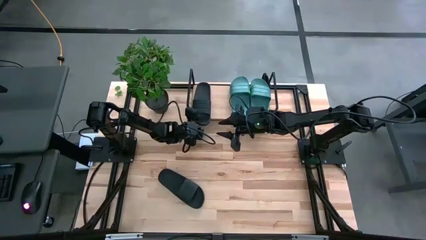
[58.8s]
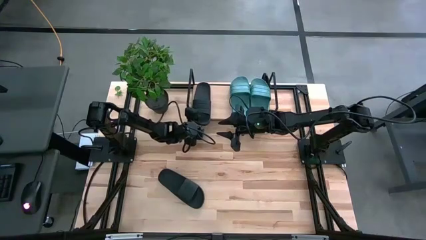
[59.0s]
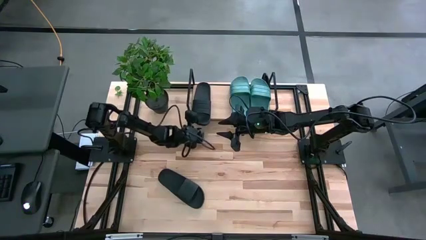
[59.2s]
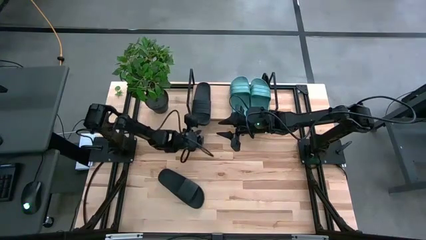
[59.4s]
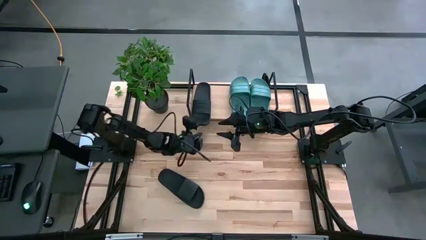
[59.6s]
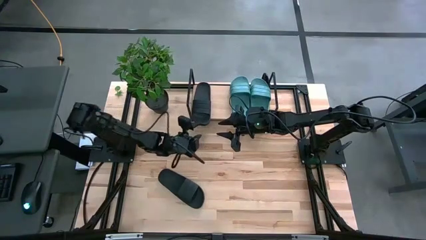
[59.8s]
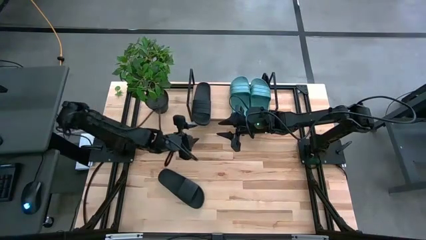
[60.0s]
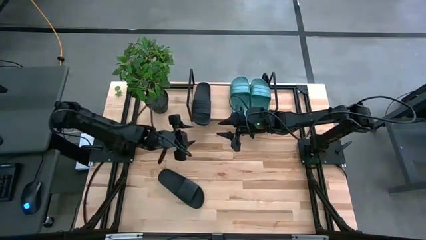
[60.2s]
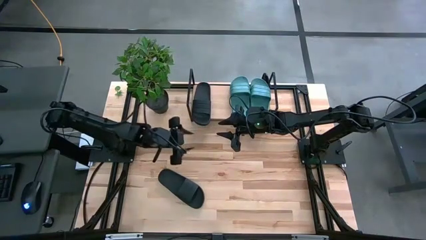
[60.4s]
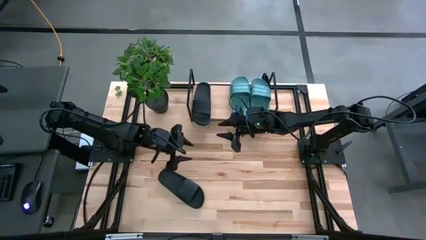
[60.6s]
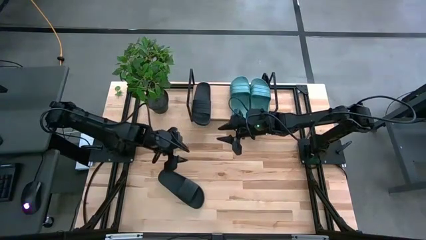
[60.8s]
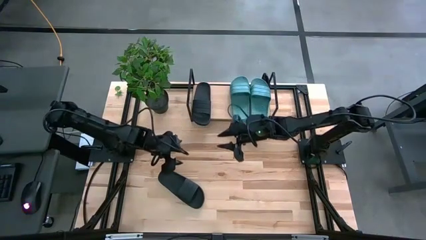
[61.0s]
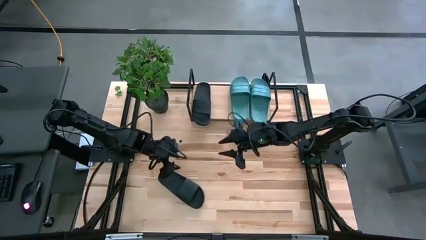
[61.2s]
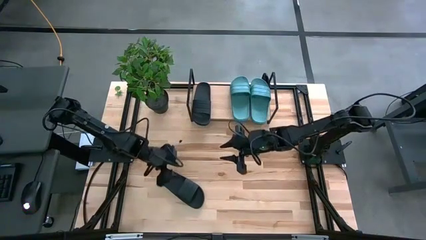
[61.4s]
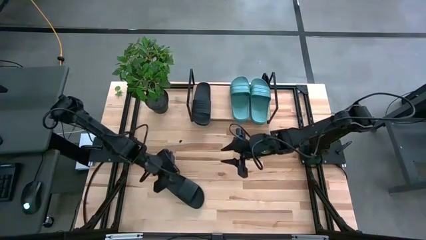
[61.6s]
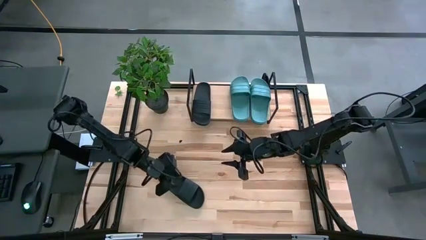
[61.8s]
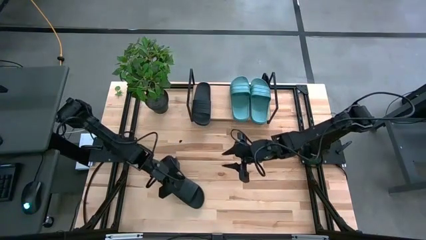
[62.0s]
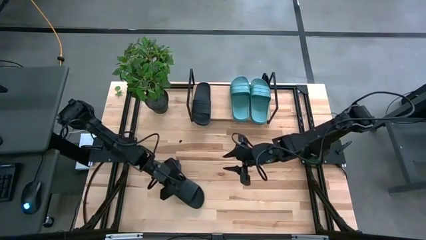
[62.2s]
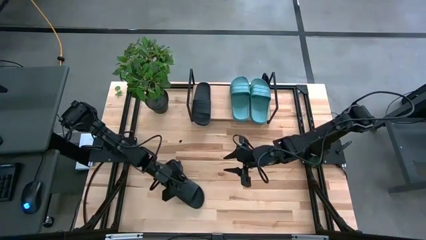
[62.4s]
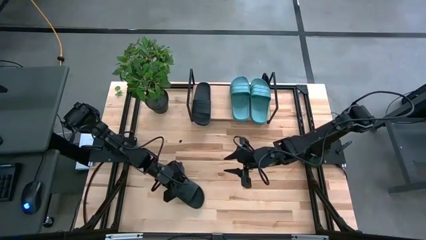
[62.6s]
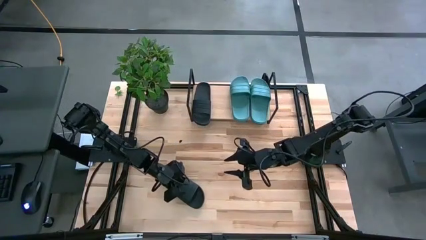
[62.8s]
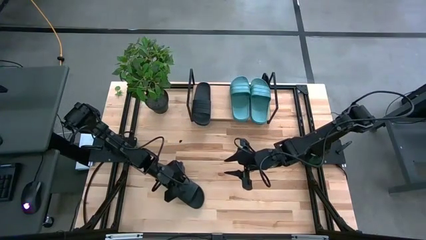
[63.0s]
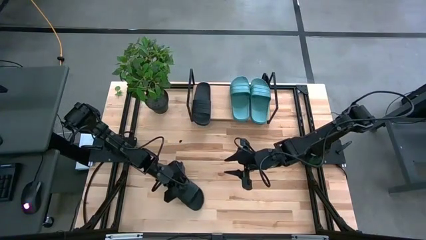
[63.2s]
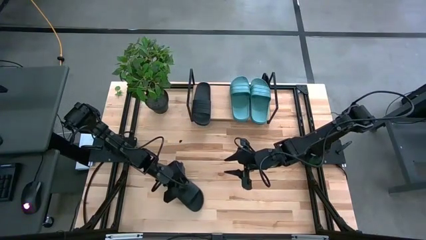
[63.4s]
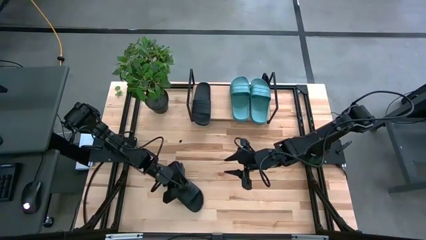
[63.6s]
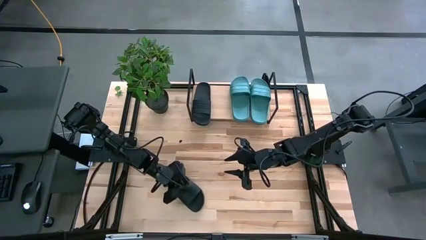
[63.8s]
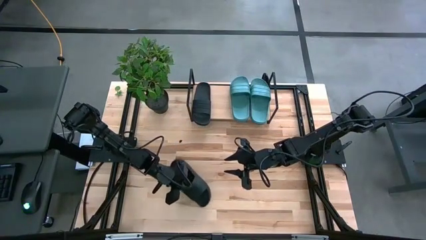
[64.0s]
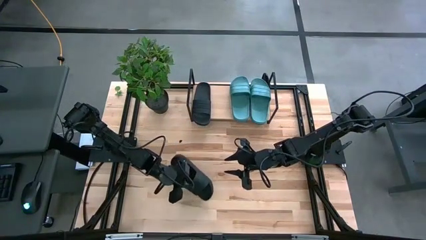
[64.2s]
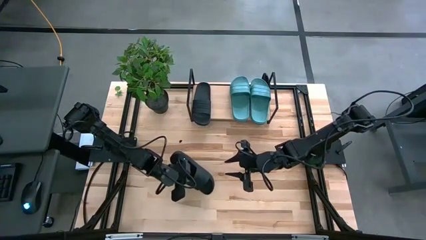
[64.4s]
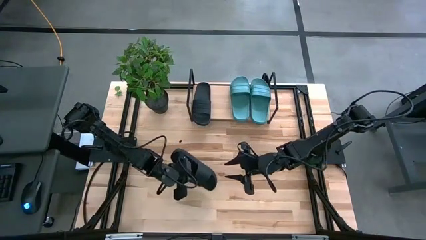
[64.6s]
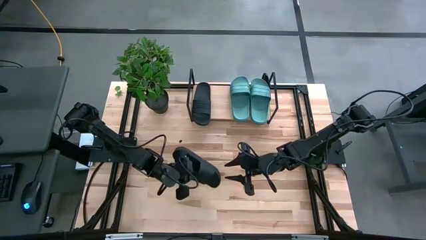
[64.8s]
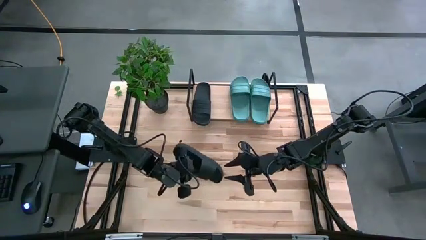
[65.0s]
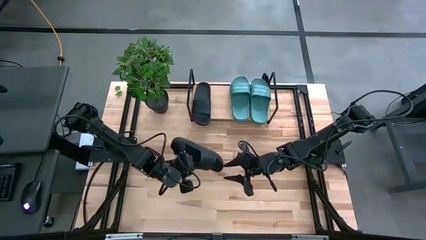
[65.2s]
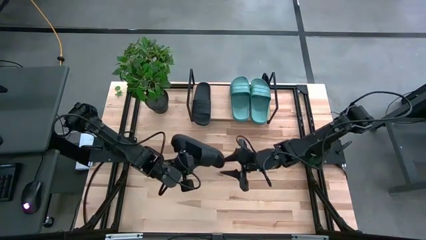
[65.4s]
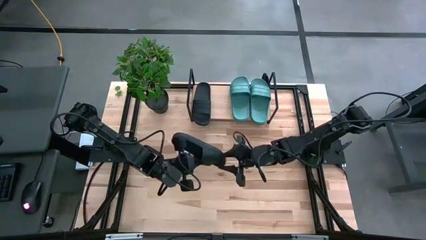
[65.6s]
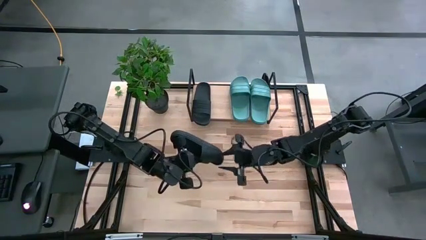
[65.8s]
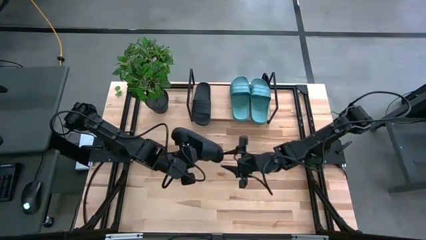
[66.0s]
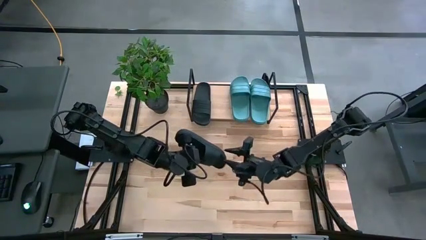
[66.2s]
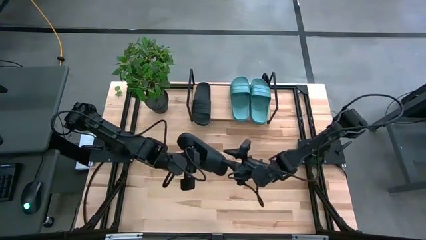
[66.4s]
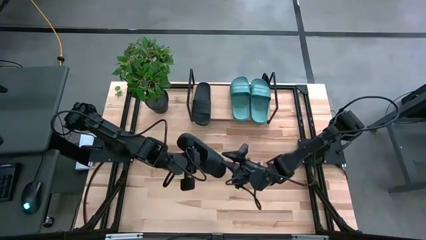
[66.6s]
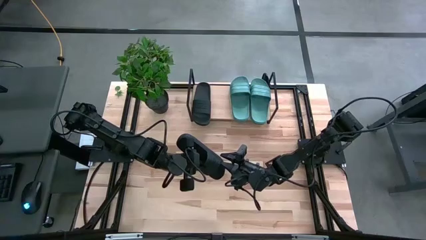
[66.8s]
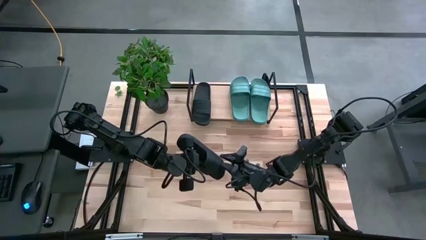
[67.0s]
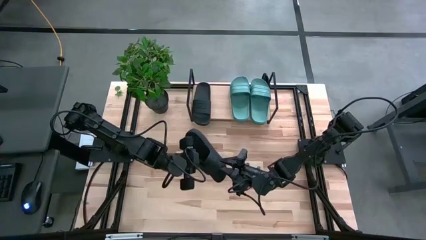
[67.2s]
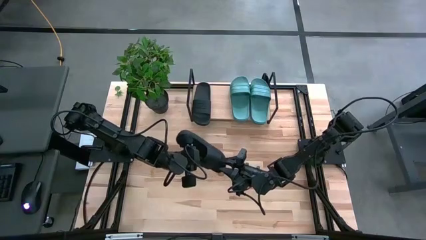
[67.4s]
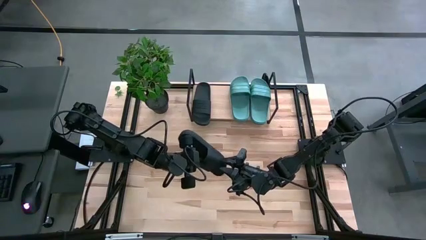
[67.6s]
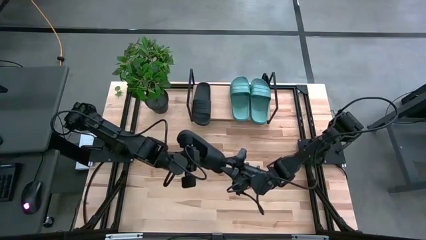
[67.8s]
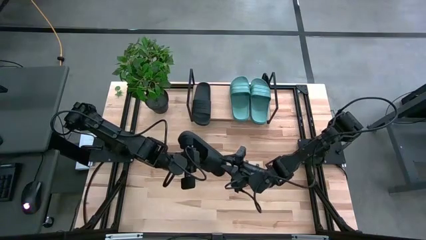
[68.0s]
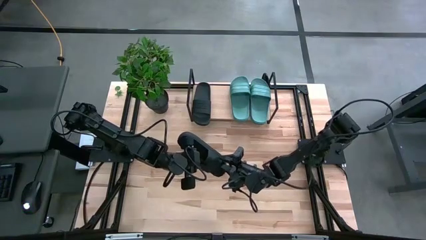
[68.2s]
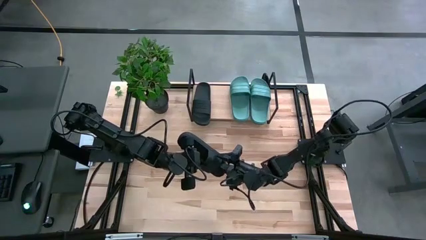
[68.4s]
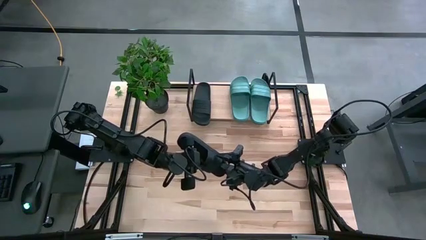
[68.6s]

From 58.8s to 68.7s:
Task: Pick and place slides into the shelf
Put the black slipper on the shelf

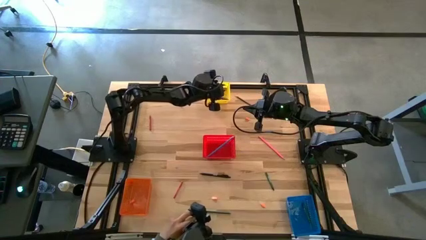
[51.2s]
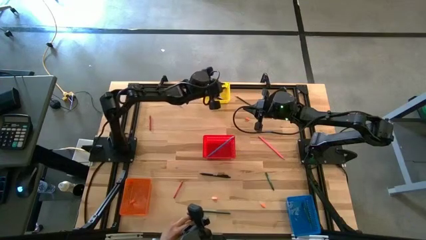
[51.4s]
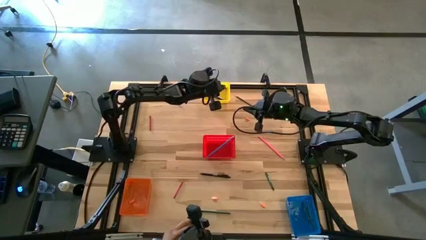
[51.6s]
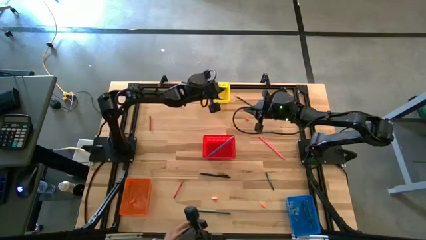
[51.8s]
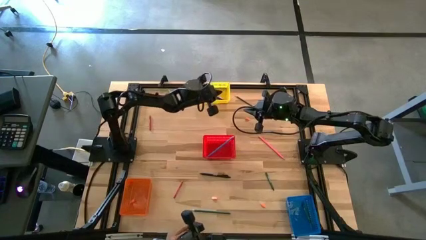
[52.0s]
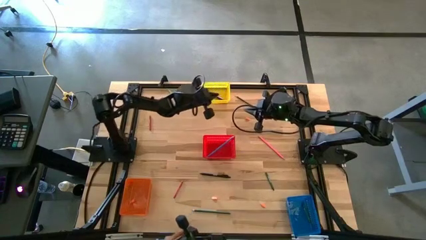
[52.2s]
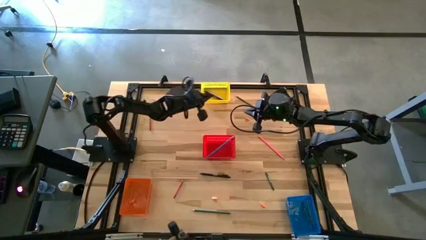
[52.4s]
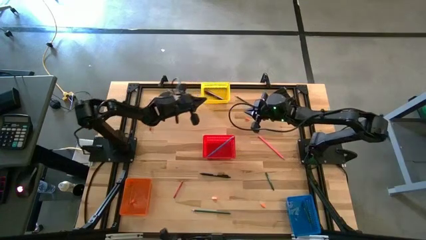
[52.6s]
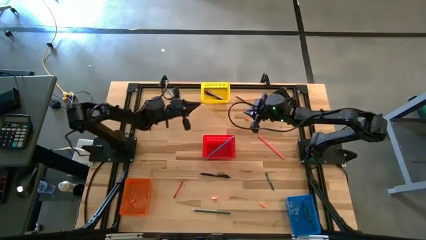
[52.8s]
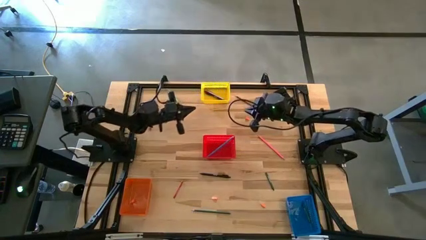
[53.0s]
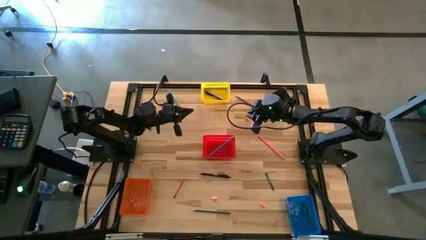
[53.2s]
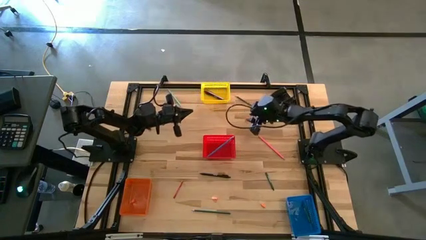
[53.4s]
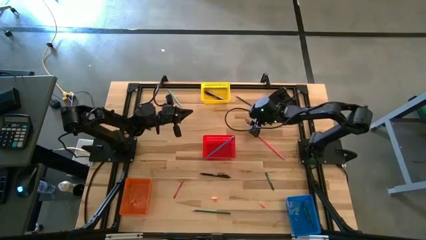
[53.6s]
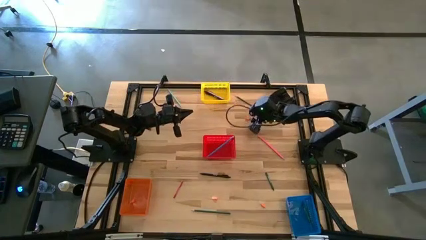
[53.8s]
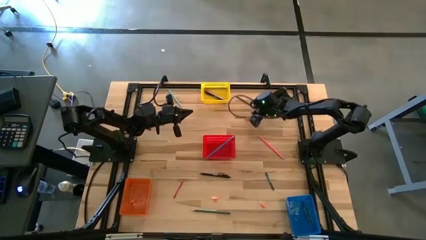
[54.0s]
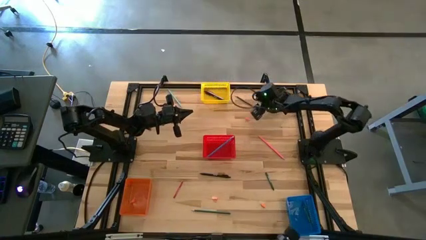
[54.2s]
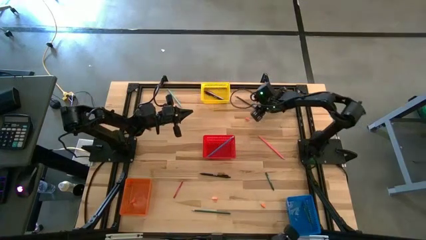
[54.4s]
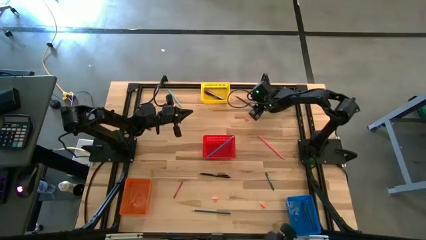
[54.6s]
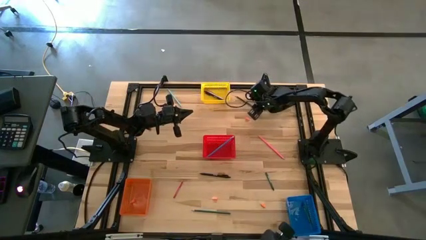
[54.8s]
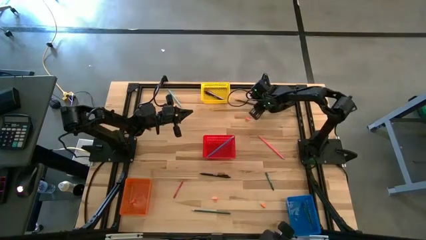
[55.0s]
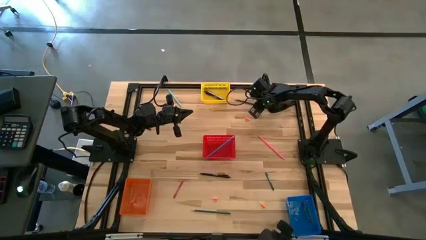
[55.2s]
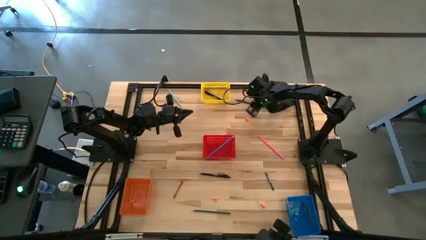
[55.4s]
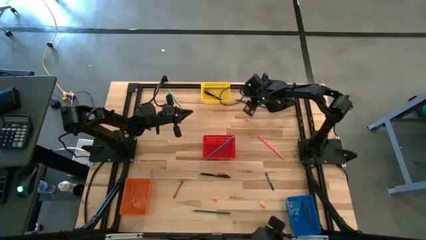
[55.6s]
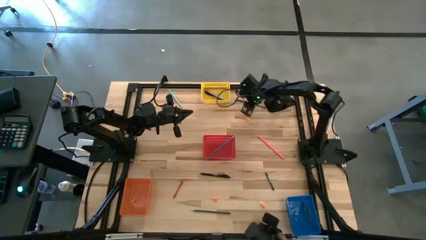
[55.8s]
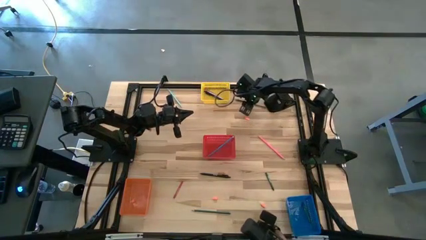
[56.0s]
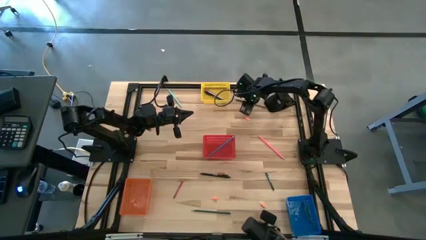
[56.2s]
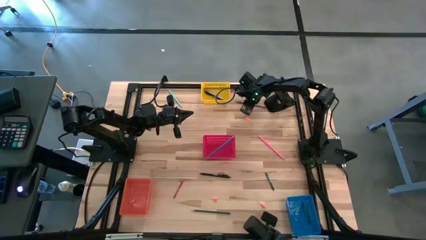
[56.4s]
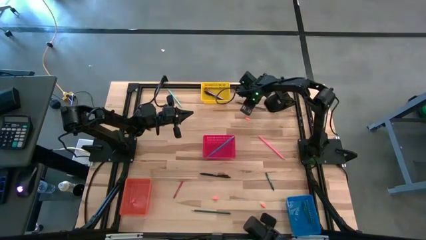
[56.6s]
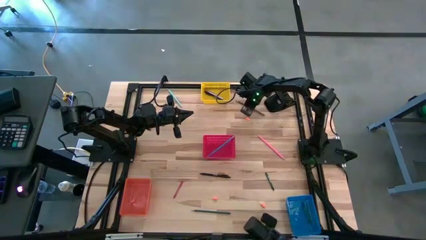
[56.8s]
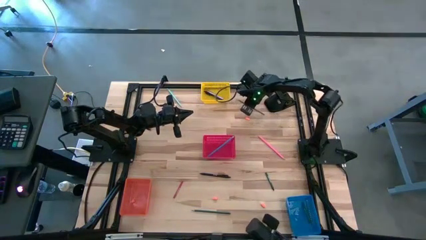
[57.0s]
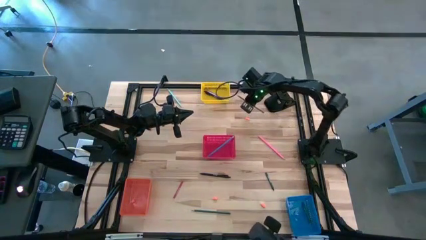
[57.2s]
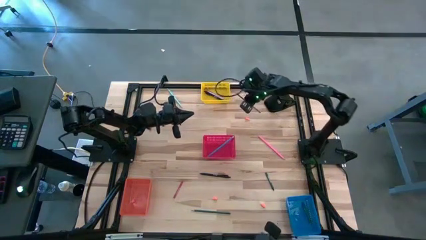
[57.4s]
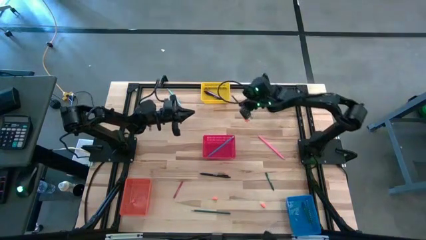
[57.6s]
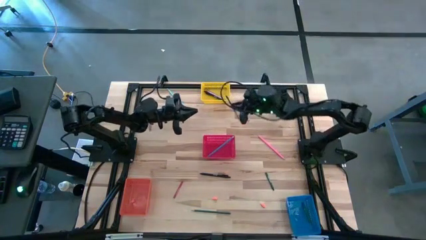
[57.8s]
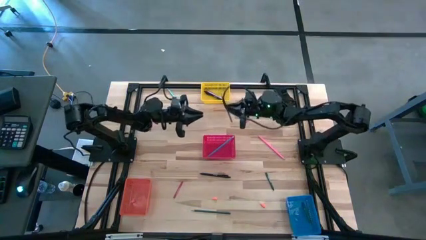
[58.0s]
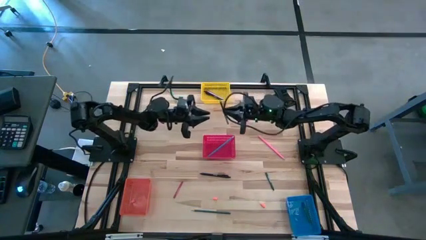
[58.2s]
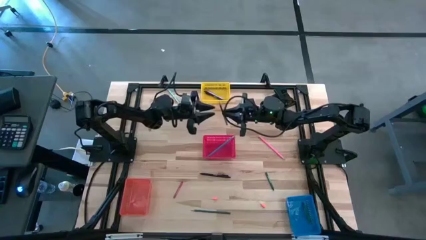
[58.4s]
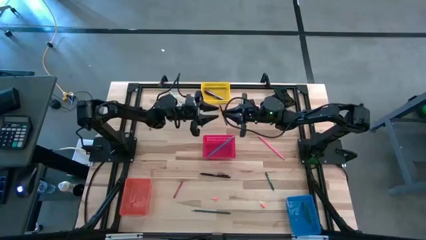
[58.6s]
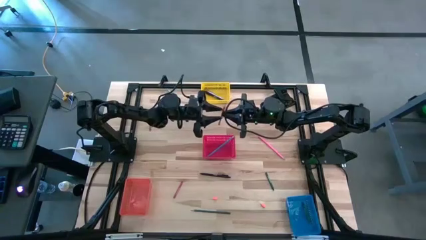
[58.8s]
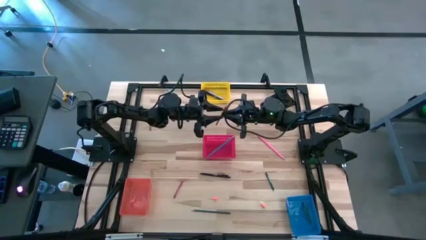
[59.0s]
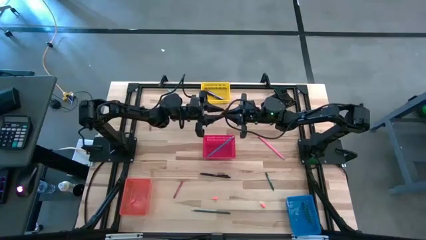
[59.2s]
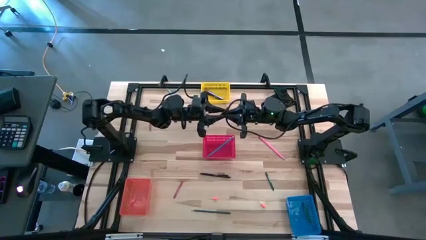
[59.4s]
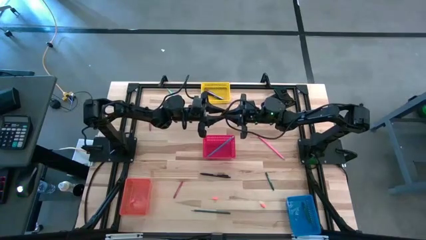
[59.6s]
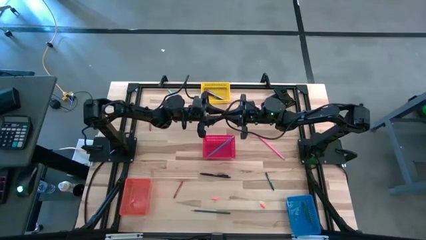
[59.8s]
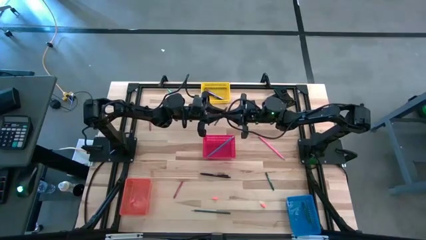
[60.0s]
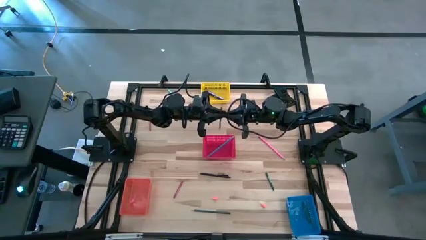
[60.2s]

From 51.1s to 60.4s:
Task: Sort crayons/erasers/pens/pencils in bins
Put the black pencil into the red bin
